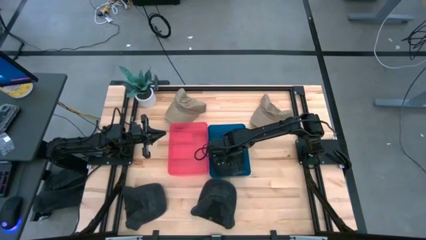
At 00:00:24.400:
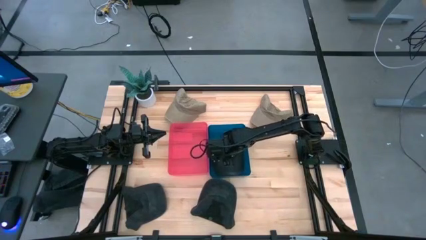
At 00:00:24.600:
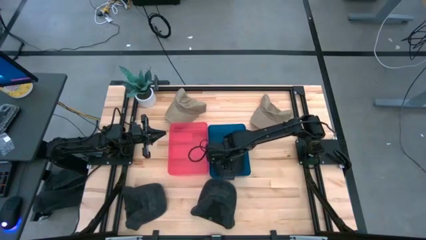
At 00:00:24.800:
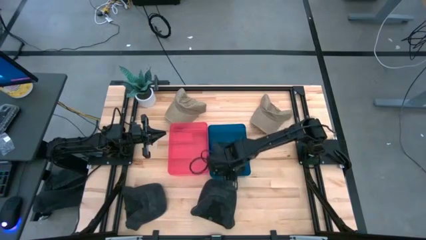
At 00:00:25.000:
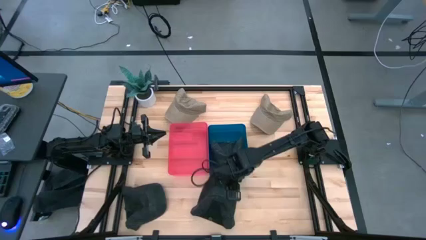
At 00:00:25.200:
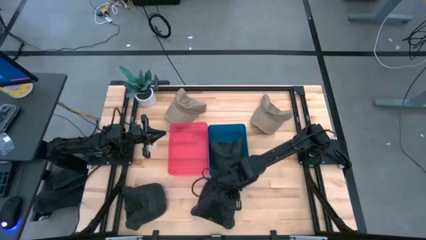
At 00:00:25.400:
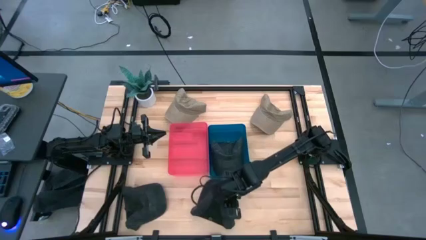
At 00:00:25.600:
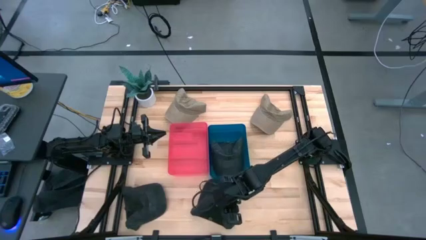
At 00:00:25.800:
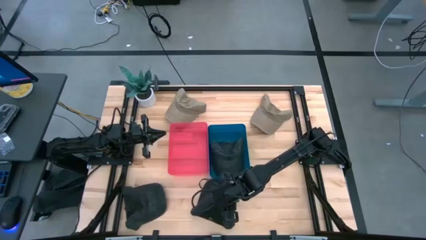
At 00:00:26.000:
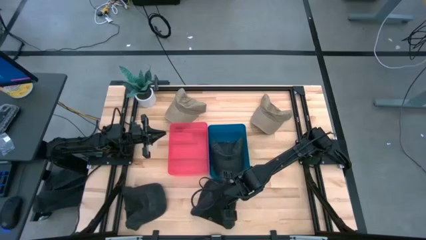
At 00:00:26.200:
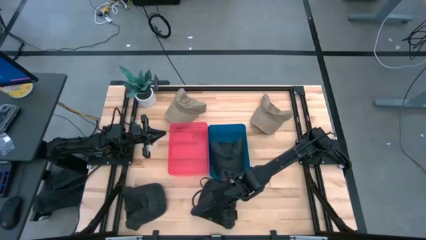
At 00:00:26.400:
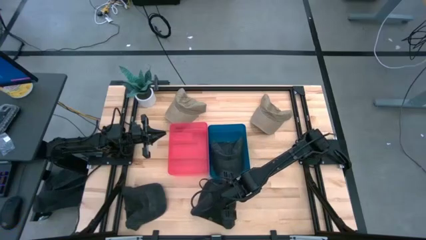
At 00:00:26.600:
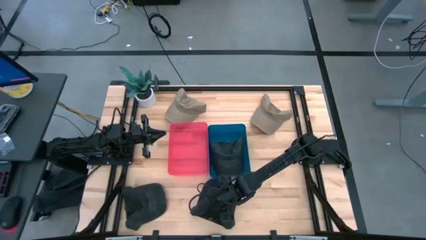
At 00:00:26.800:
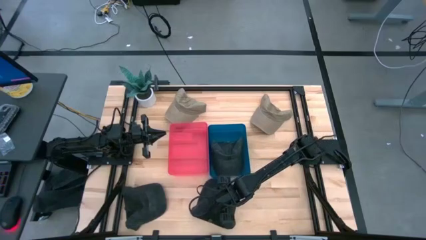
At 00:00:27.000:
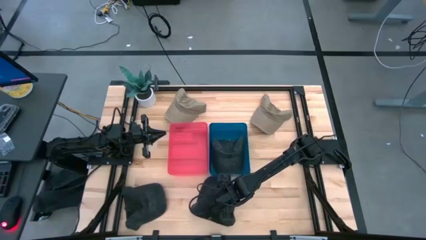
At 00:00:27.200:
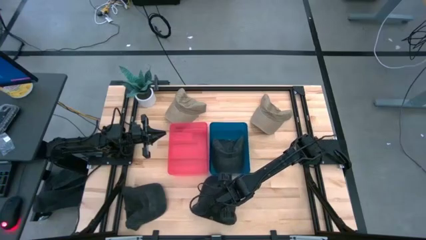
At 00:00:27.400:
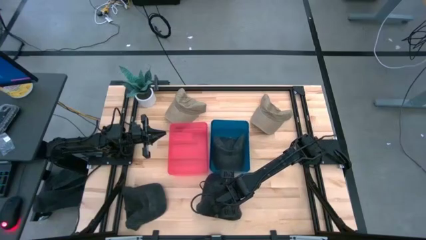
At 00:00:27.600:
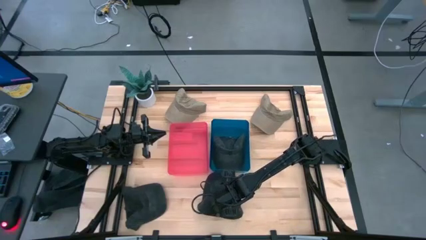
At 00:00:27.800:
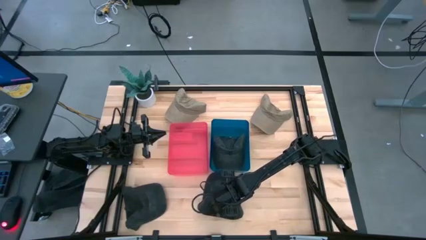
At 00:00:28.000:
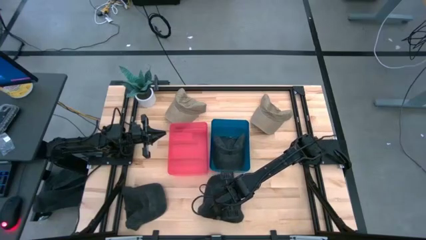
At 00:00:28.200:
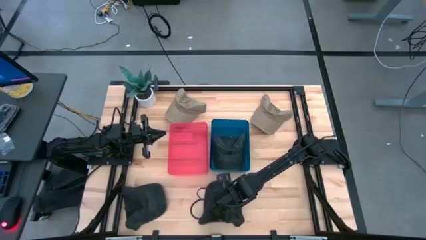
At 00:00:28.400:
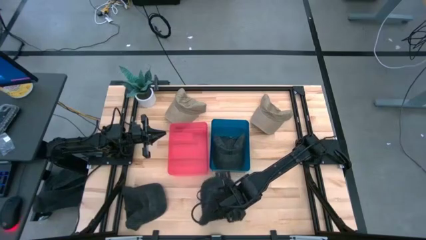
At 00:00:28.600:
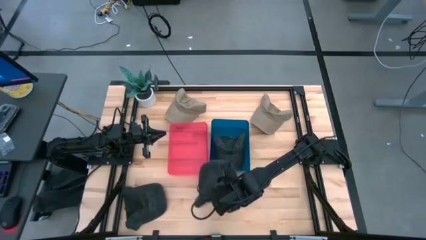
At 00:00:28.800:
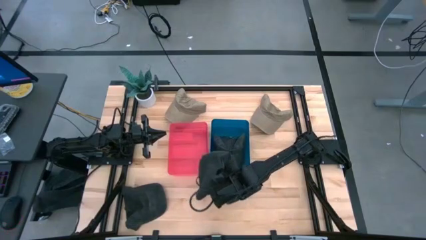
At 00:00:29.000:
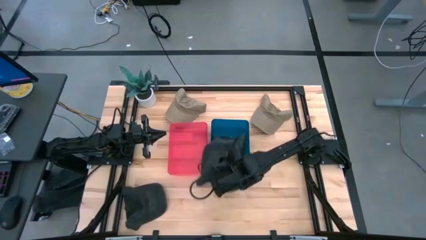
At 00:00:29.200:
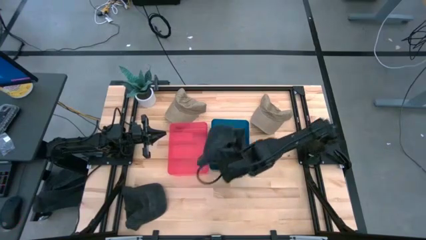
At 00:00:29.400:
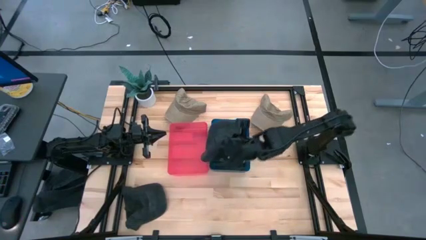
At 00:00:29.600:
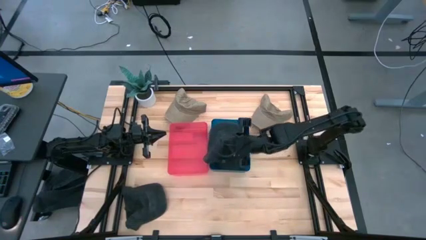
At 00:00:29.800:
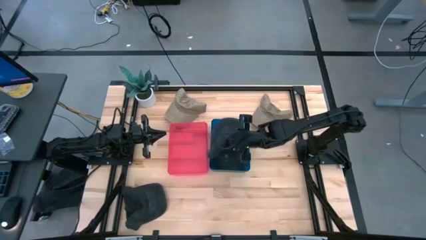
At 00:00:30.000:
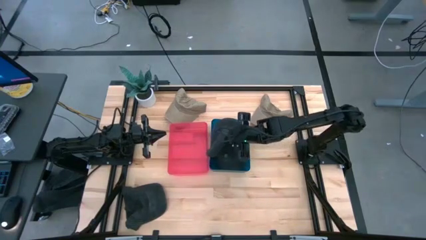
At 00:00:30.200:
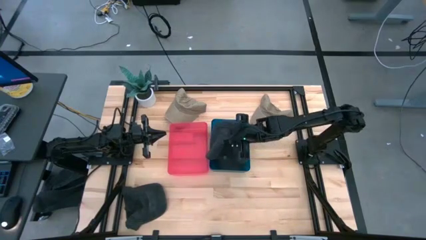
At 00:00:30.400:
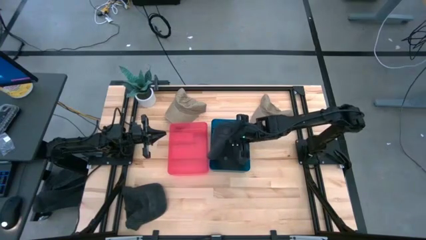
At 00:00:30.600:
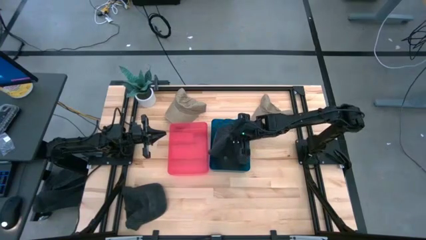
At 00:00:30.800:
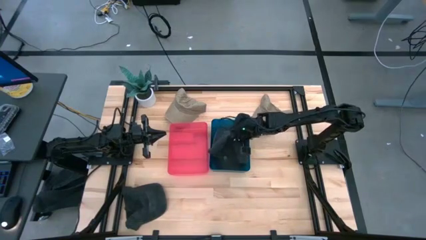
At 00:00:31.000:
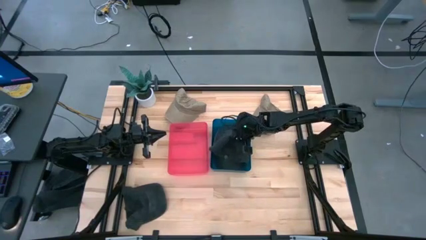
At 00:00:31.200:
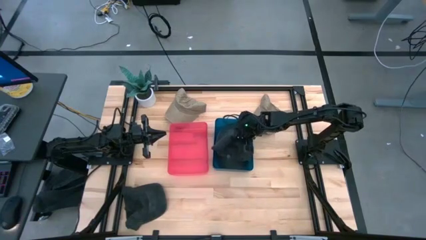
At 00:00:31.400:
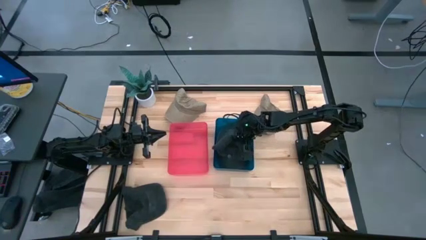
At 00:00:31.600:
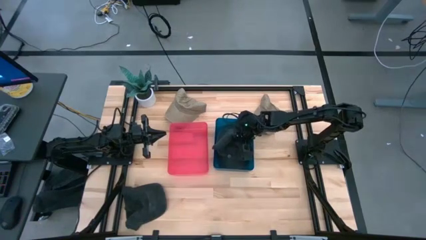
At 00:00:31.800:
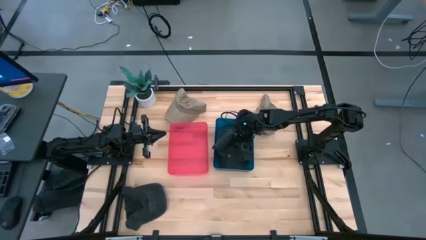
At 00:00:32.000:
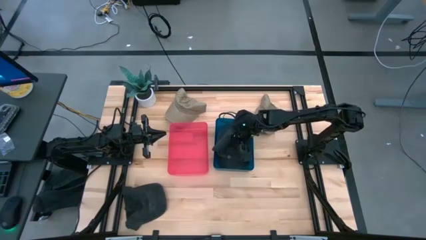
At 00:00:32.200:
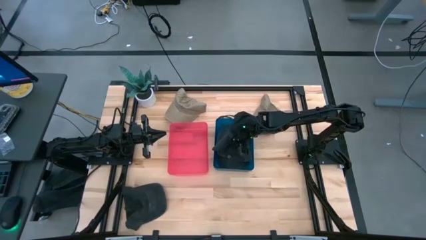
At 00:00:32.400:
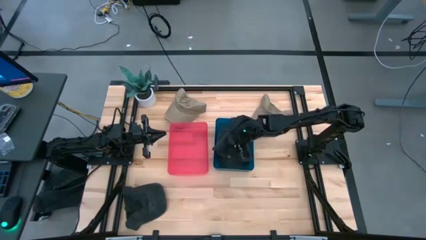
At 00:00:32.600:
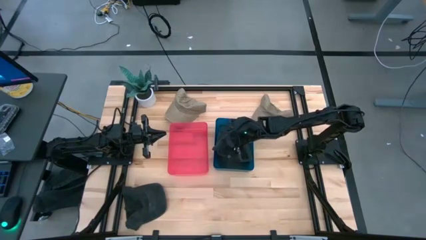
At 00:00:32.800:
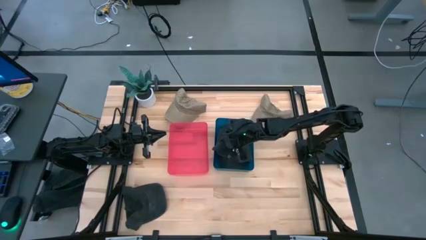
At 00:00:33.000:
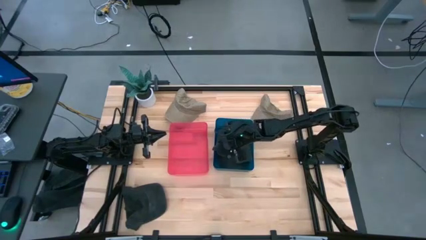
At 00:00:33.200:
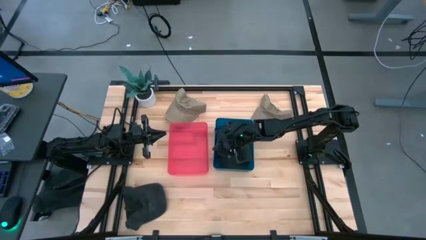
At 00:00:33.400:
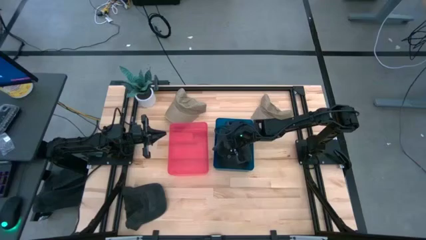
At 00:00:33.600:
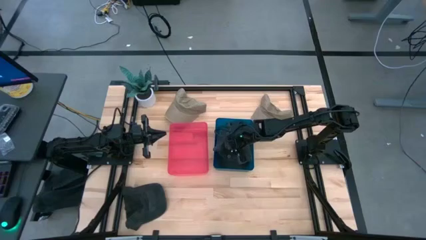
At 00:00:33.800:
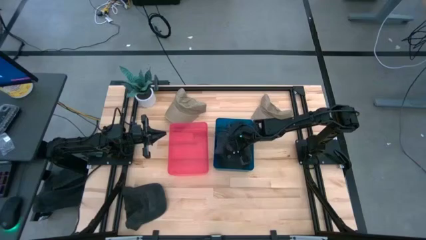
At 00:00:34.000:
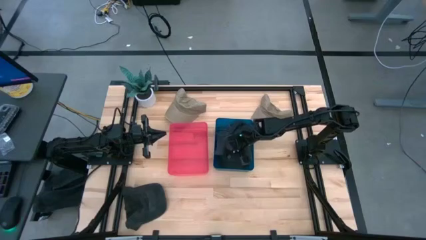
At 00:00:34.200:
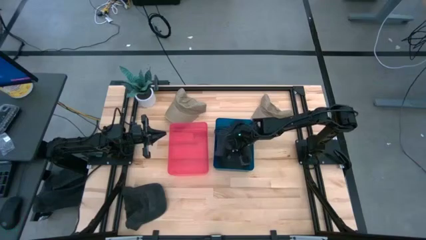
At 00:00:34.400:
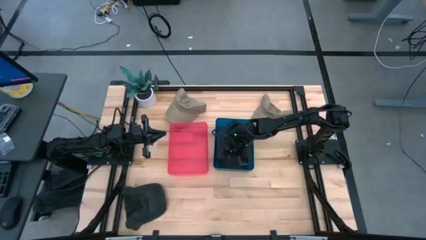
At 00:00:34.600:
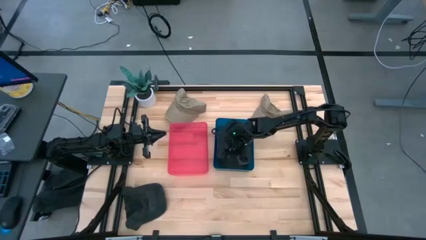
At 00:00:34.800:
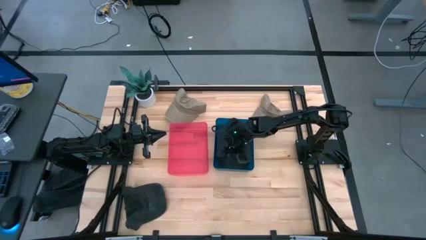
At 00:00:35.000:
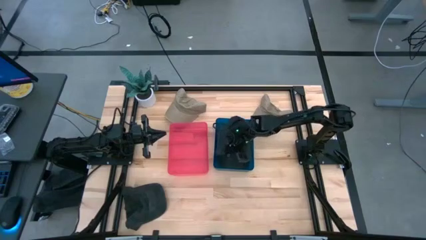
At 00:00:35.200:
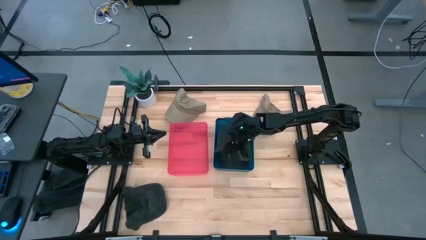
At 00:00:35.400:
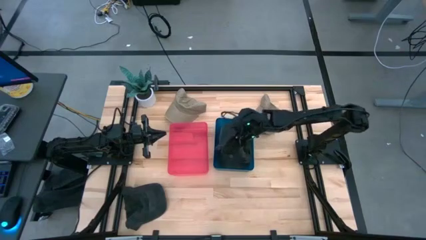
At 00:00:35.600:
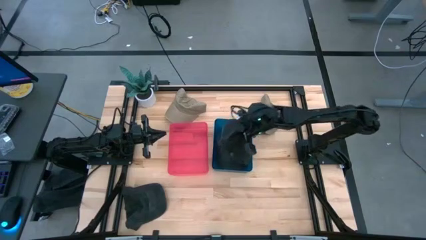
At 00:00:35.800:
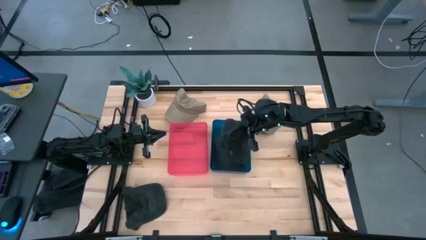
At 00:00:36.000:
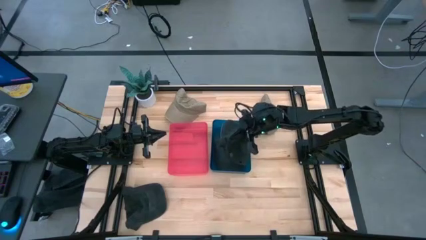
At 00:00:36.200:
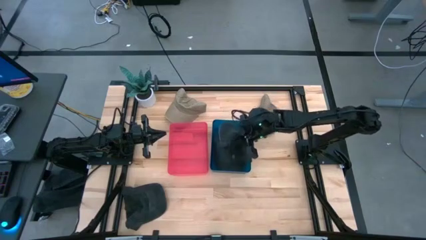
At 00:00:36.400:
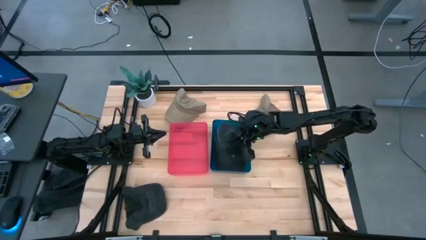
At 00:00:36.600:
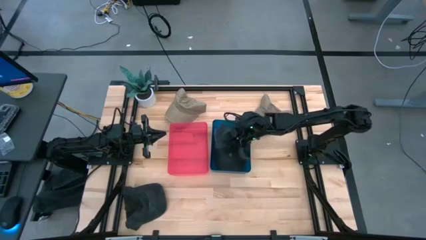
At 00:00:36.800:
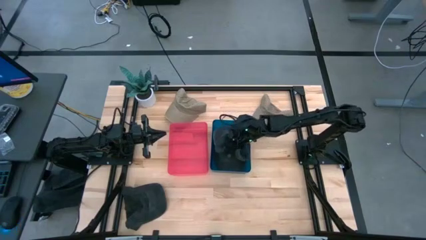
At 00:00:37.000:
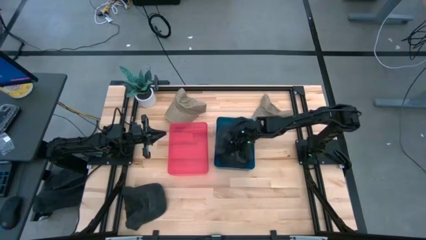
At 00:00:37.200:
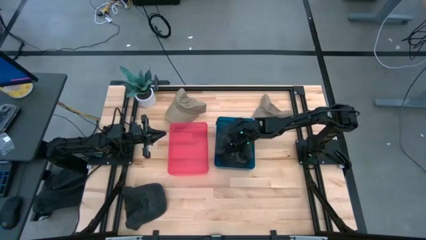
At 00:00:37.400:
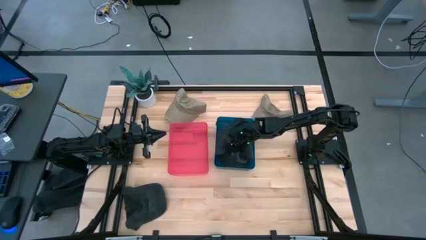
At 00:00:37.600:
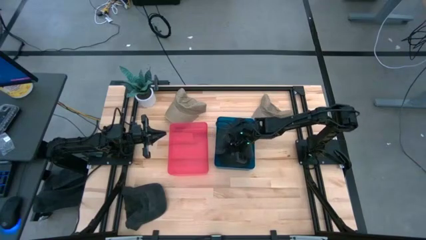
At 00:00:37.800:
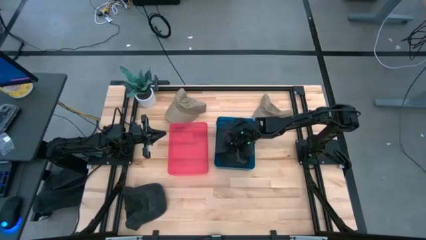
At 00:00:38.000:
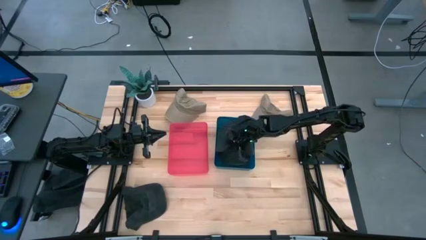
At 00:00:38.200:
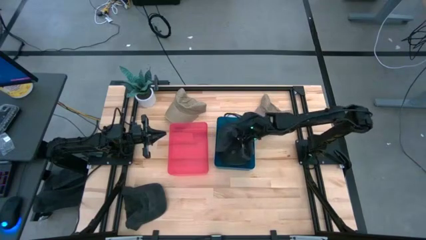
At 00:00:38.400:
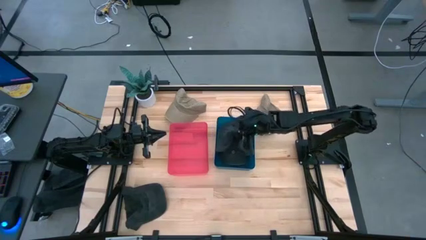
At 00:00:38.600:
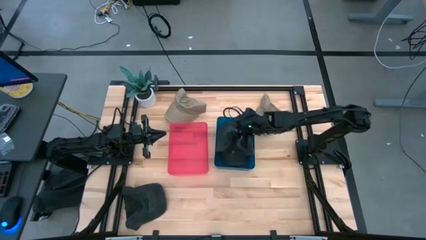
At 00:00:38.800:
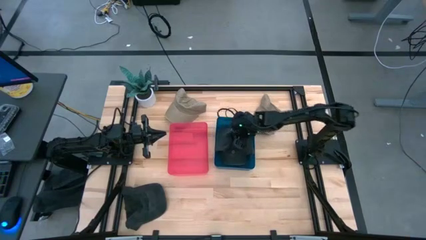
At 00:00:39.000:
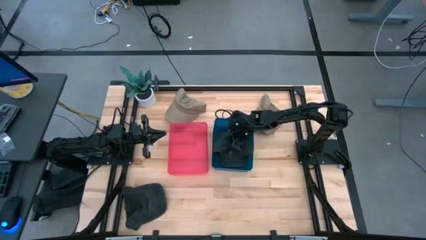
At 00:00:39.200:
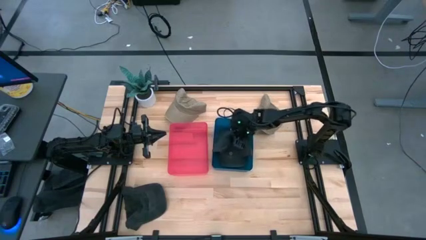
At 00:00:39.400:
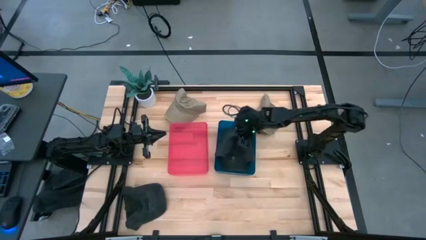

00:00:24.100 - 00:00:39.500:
Task: Pick & Place hat
Put the black cap into the blue bin
